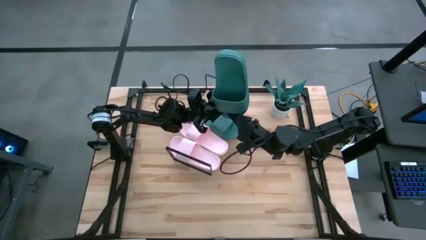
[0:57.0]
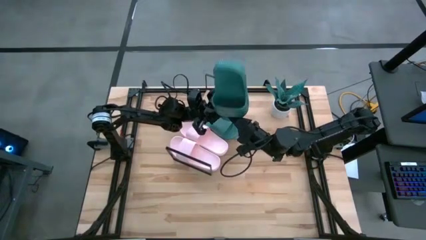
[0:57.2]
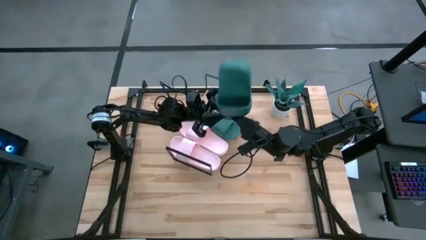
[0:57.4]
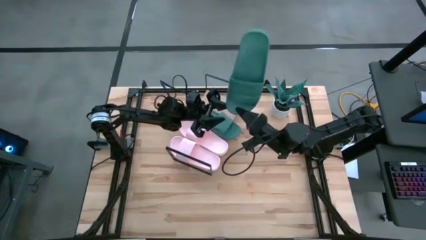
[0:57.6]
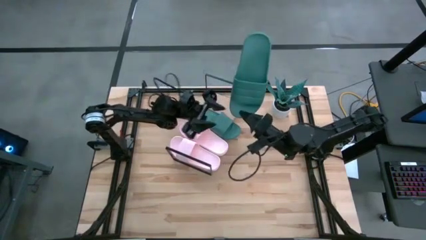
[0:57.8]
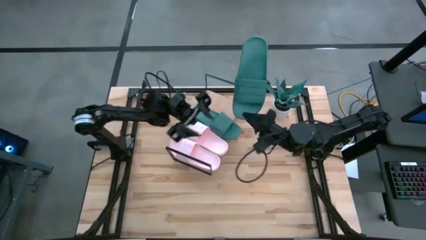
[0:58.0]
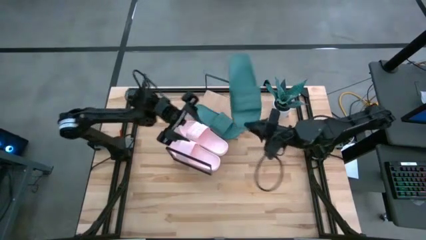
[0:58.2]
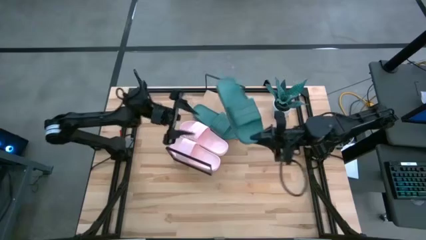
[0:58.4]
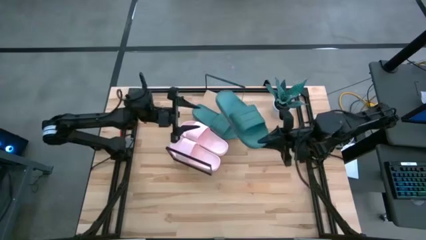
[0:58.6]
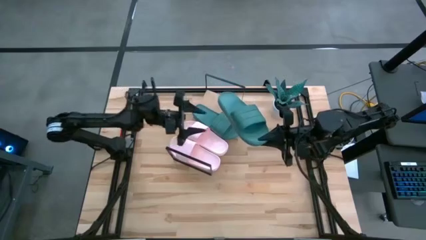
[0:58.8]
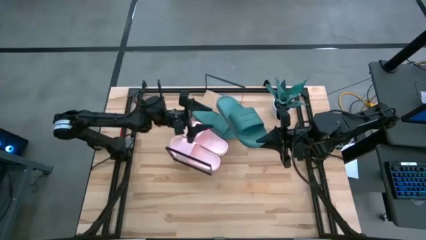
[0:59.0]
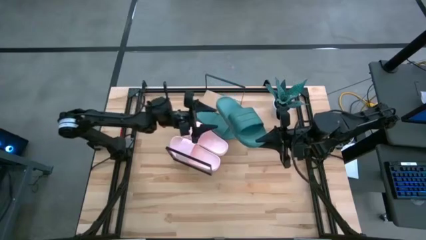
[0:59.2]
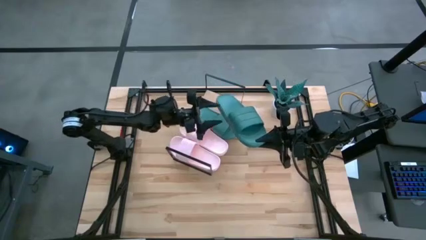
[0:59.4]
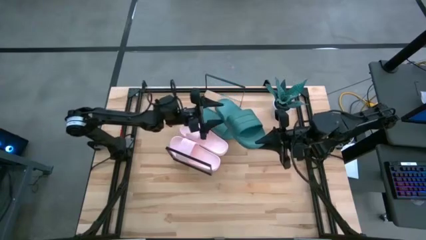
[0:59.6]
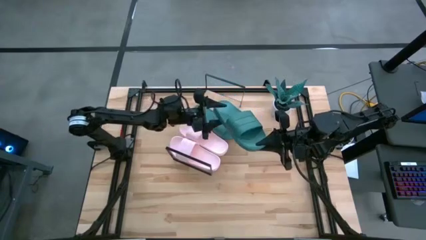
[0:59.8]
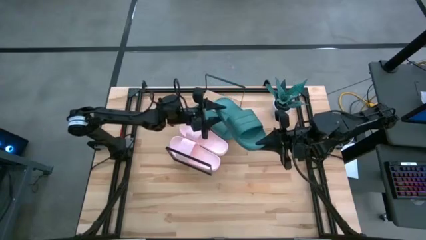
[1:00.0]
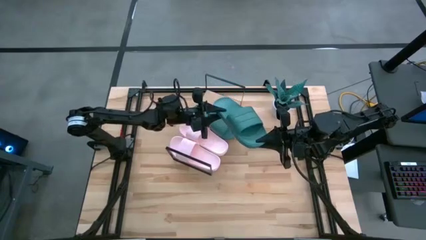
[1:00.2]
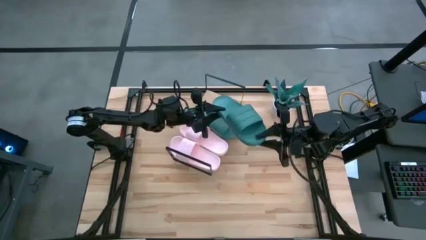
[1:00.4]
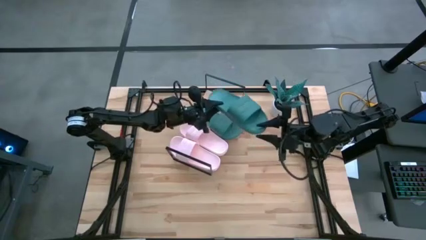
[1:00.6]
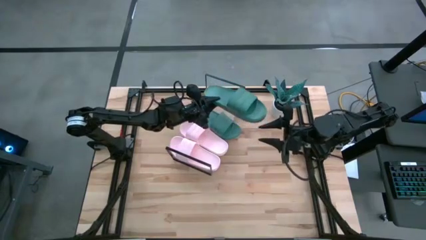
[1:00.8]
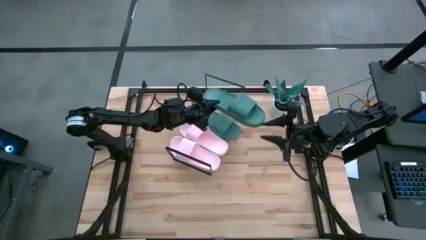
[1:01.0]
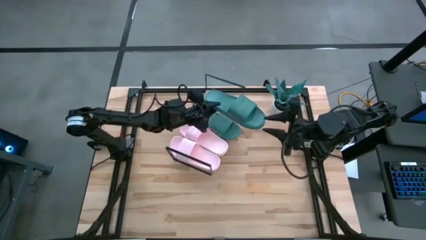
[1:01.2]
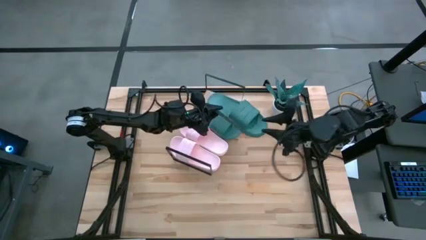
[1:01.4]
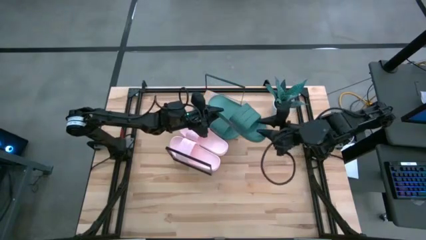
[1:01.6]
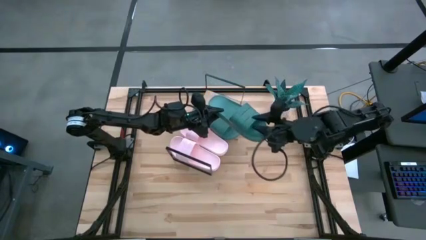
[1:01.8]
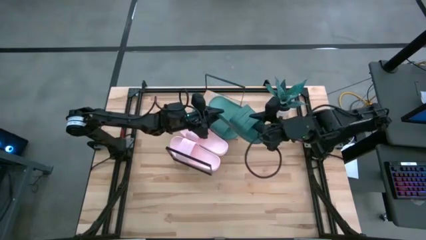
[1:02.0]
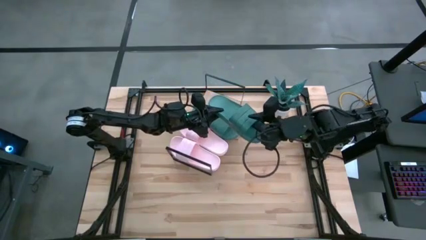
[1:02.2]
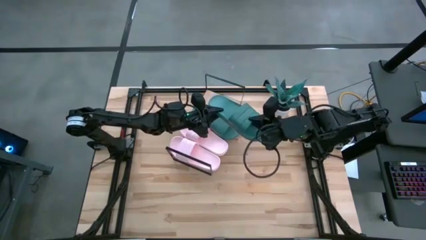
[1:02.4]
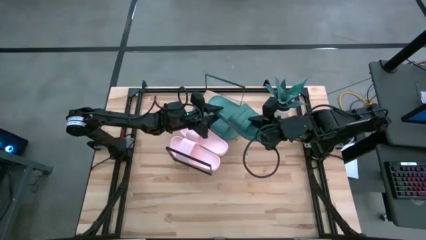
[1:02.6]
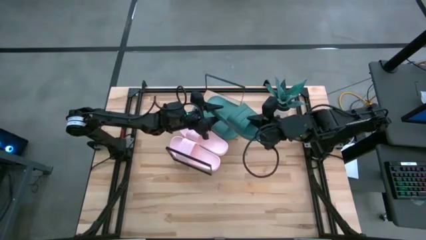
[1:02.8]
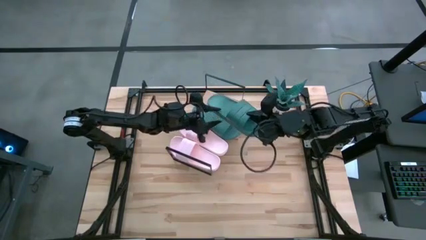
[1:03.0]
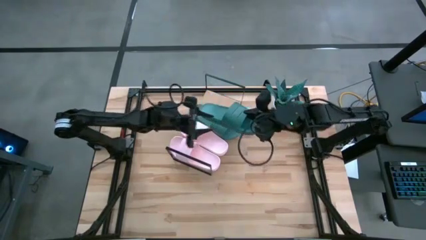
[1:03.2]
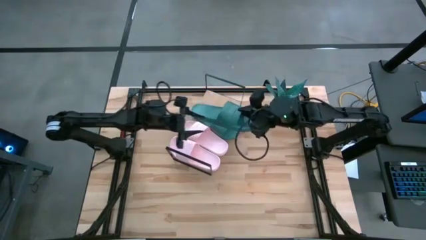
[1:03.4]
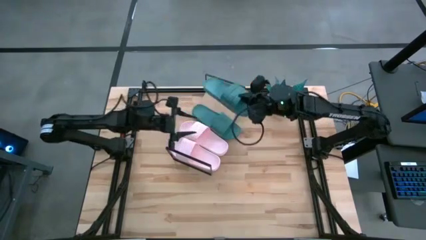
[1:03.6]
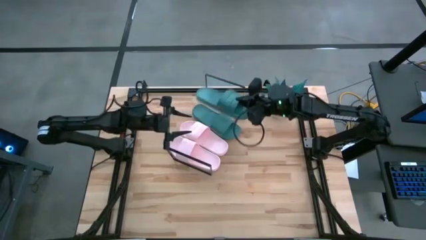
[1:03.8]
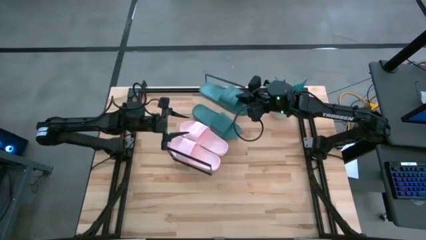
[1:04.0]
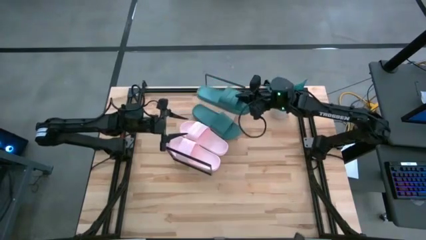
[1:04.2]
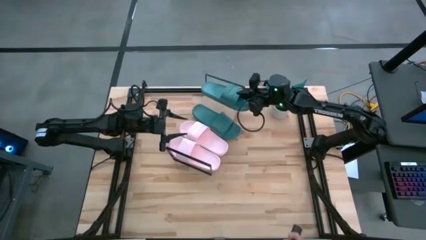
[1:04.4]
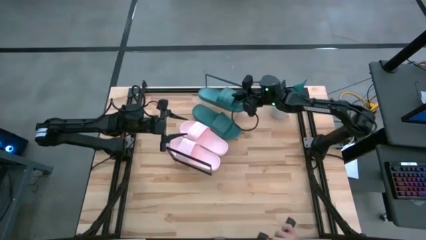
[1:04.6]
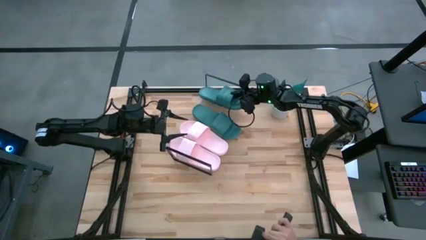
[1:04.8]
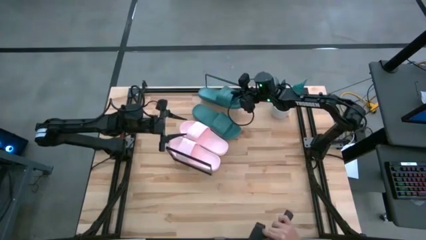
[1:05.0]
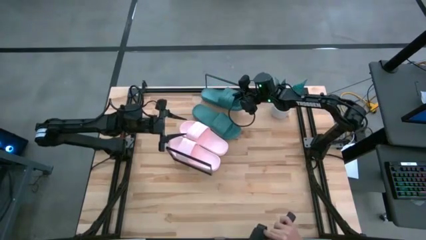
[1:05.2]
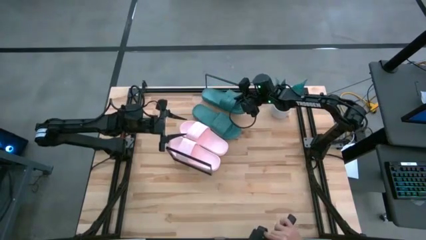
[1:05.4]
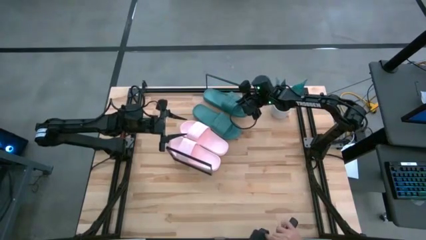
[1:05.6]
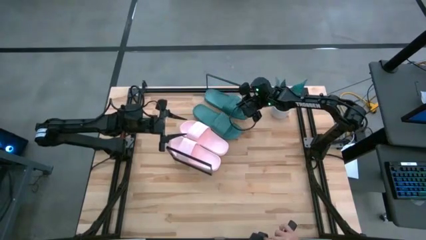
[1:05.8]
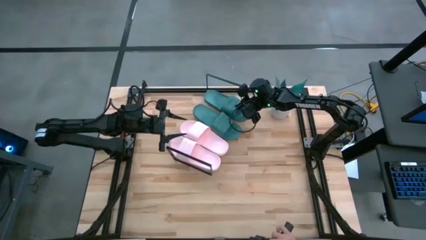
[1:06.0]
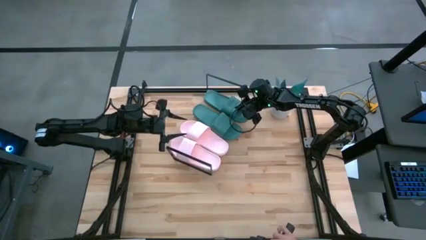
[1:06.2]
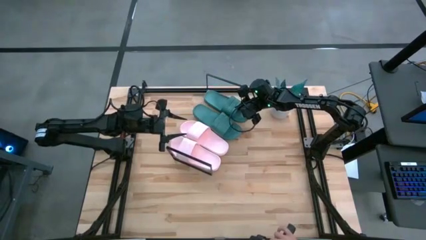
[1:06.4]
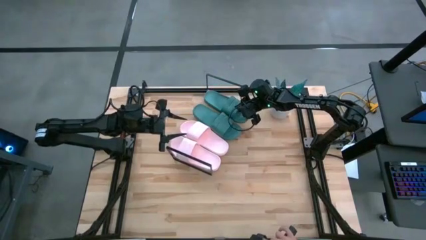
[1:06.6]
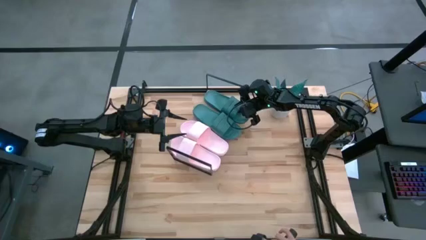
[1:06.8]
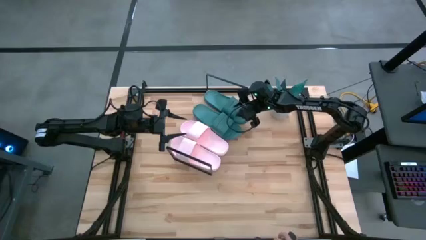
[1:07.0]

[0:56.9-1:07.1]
Task: Pick and place slides into the shelf
Put the dark green slide on the shelf

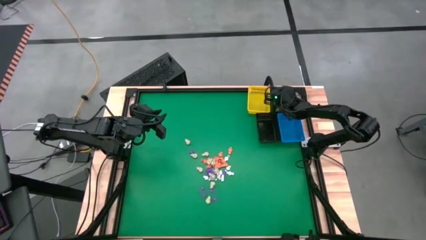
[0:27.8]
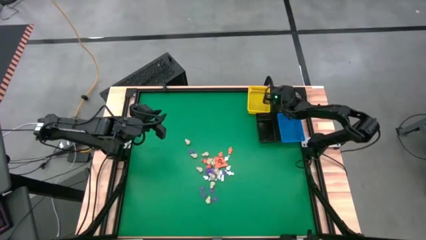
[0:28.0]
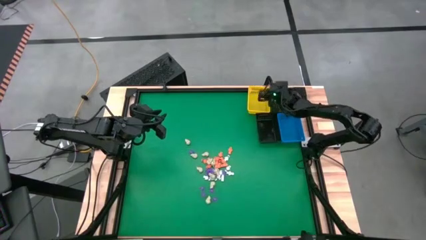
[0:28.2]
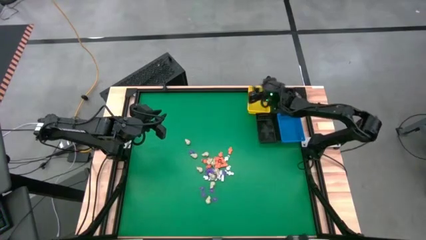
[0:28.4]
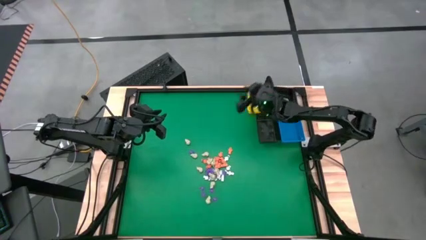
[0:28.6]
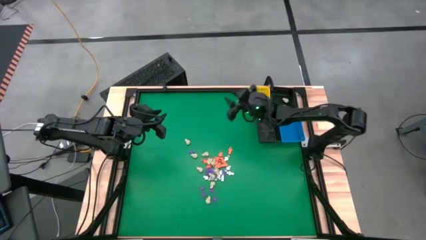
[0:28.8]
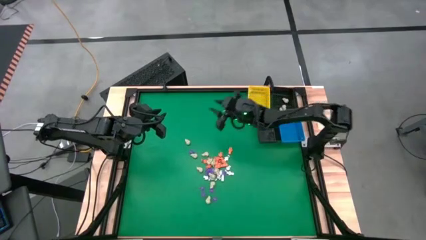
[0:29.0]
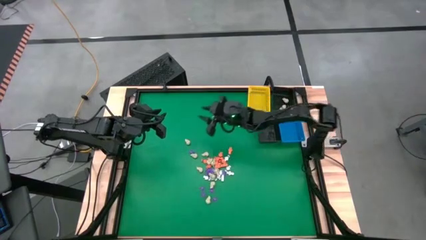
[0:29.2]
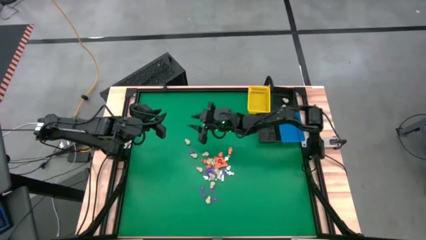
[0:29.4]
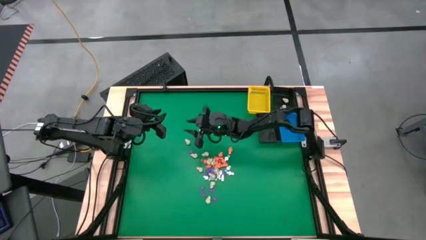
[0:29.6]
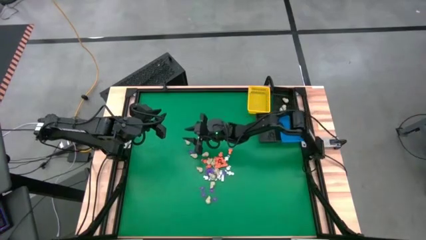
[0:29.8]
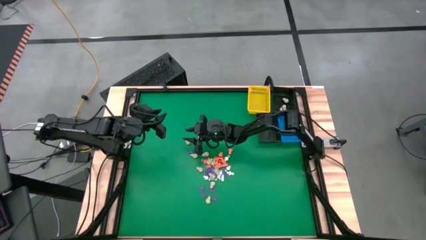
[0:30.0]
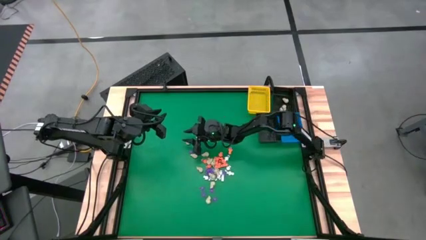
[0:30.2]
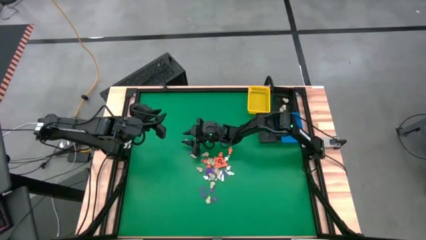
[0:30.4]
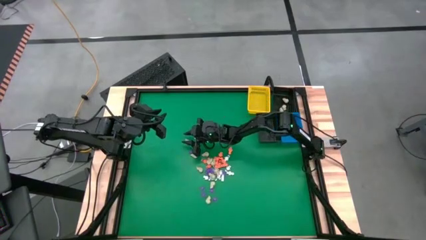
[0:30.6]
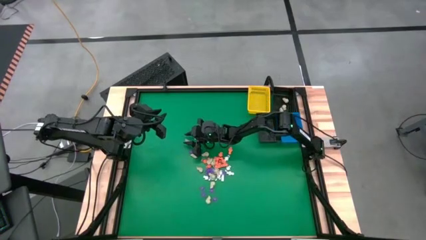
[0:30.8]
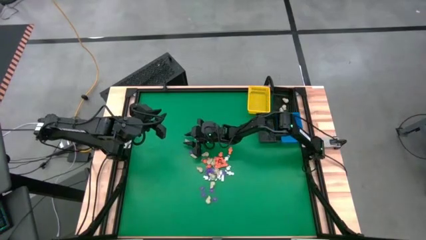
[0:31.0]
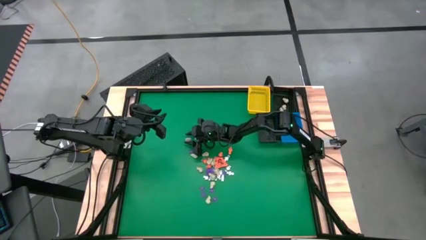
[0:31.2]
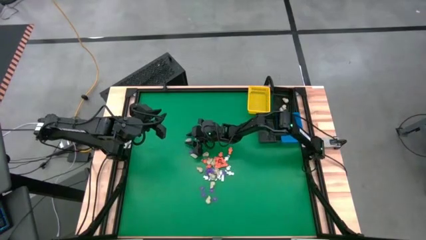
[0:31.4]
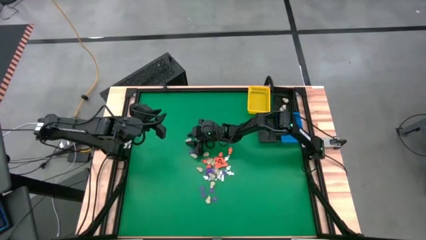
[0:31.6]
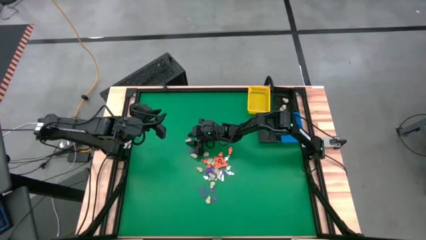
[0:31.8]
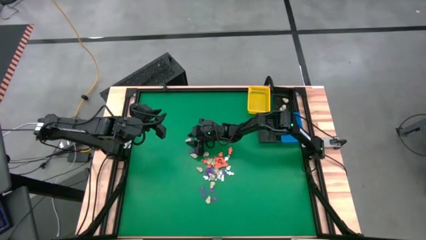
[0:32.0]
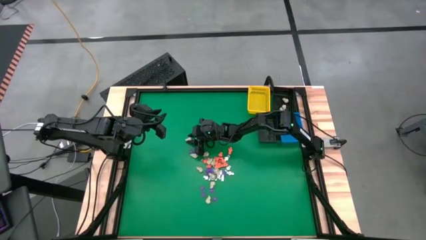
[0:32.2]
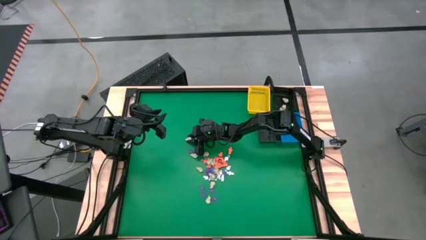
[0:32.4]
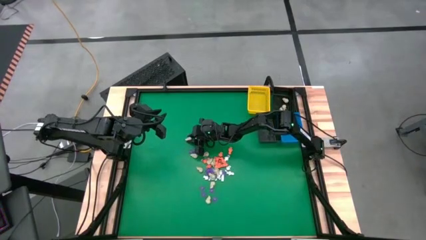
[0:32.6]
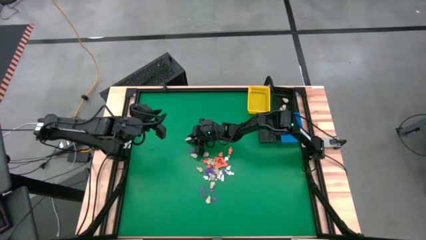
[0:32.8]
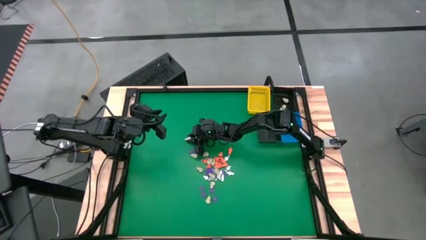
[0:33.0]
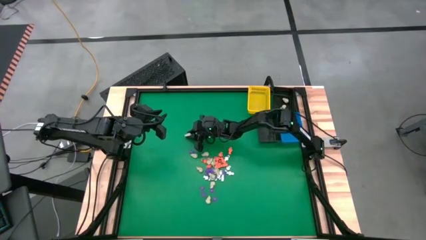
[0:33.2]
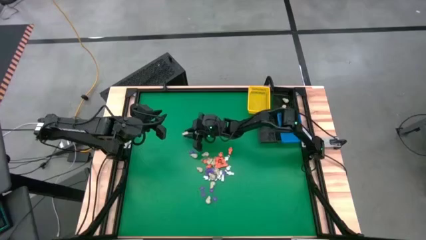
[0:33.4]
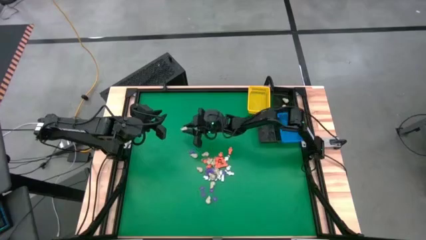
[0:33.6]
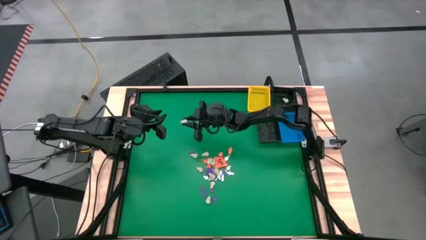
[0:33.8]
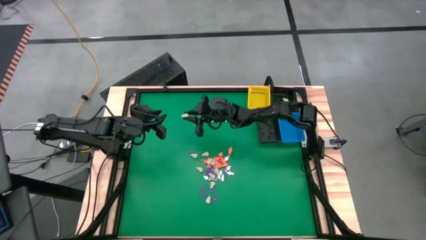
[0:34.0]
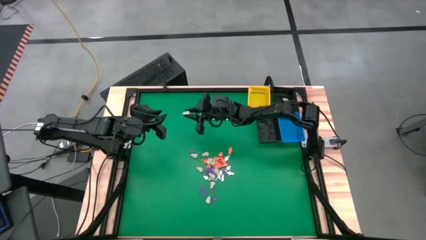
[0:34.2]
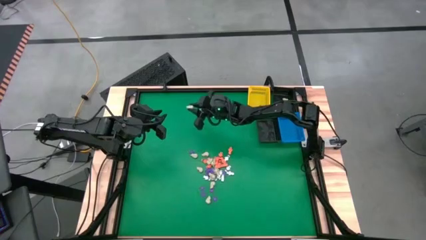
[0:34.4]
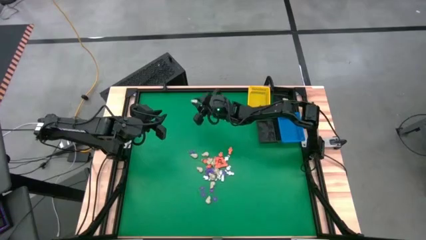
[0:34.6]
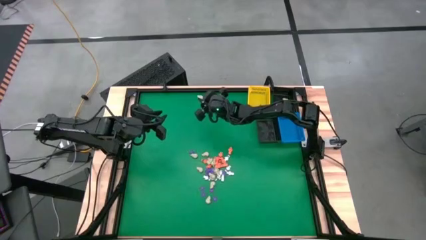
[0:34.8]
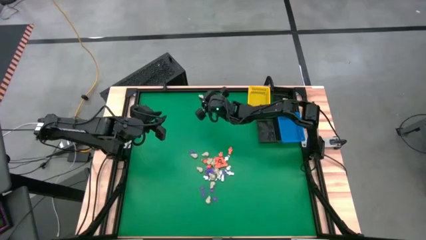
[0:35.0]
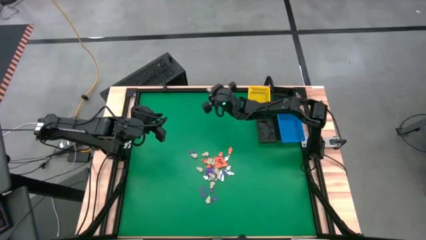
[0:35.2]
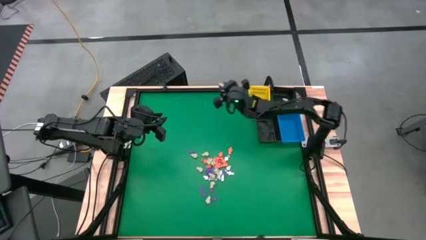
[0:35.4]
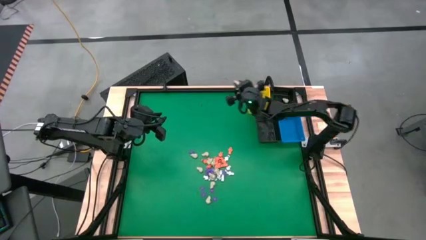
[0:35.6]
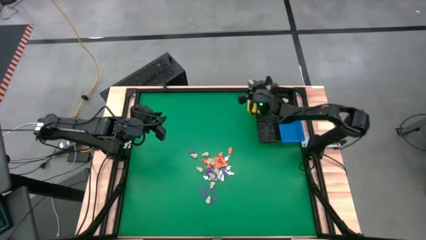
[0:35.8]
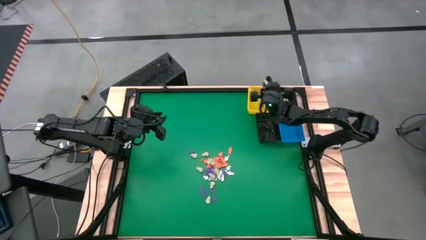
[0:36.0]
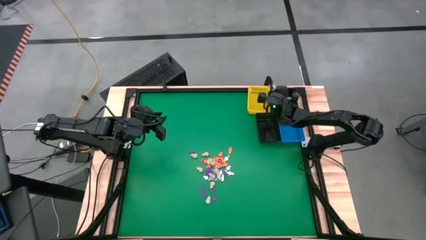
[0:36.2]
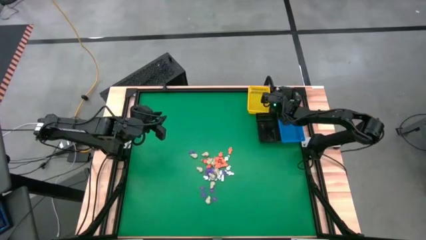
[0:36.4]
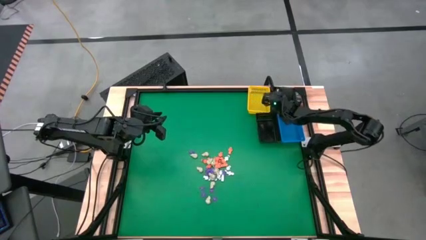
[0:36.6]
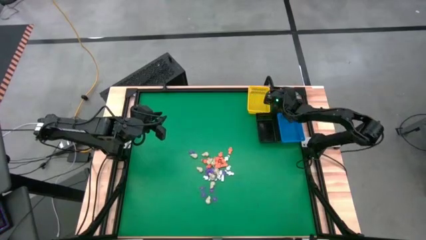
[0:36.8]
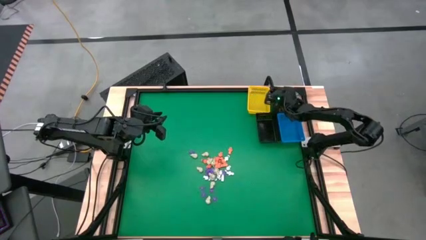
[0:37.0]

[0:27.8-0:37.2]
Task: Sort Halloween decoration
Put the gray skull toy into the top black basket
